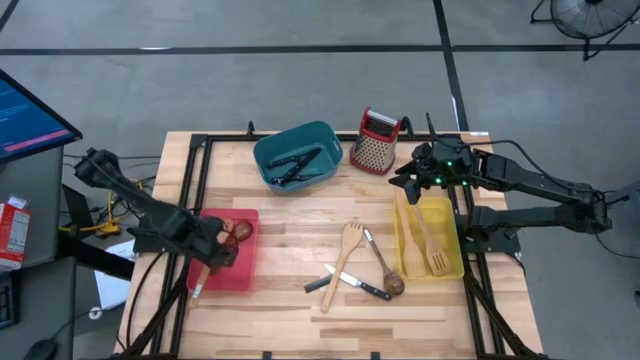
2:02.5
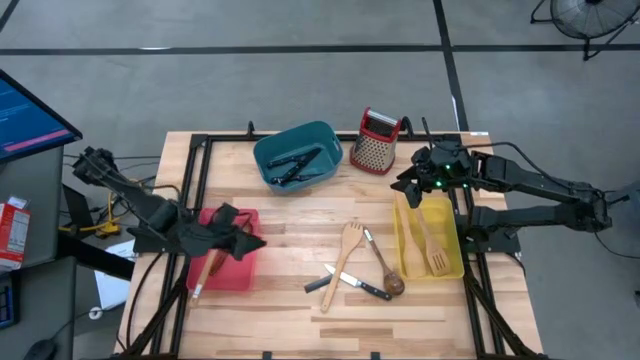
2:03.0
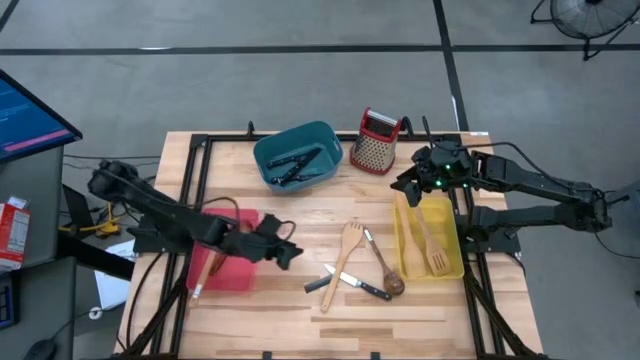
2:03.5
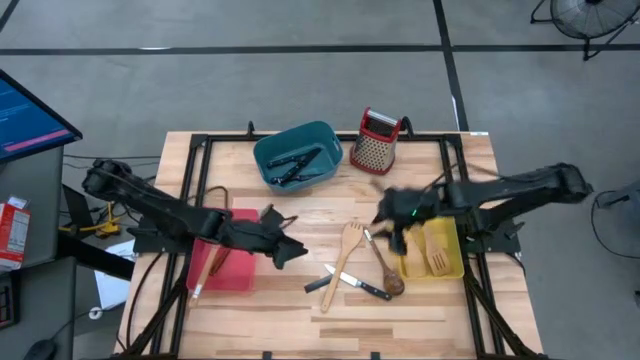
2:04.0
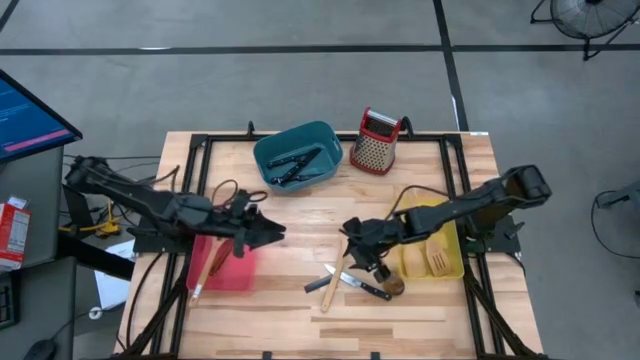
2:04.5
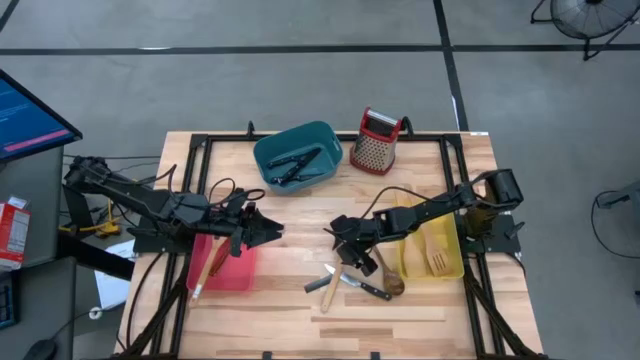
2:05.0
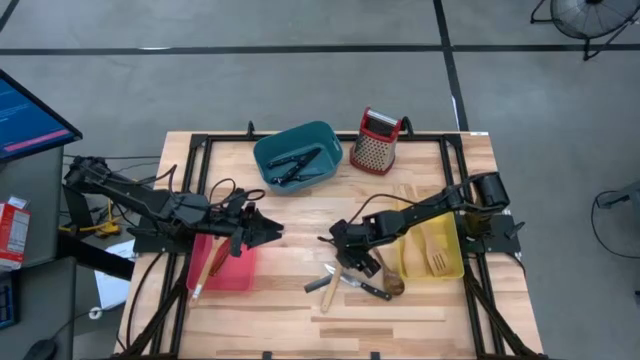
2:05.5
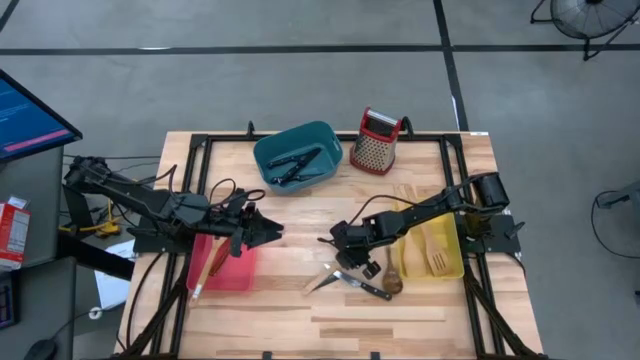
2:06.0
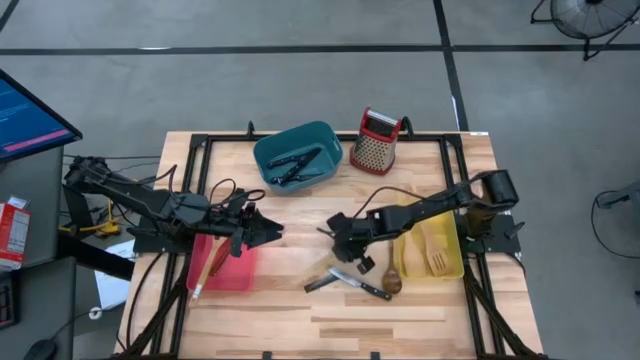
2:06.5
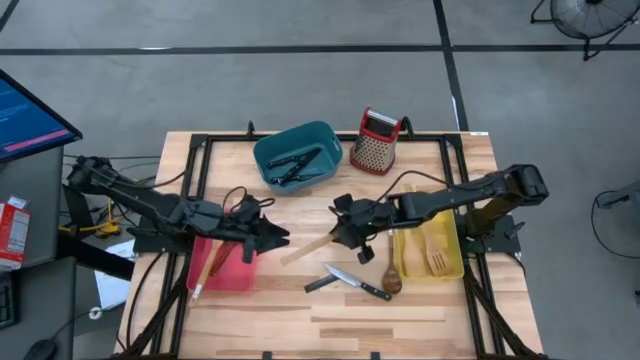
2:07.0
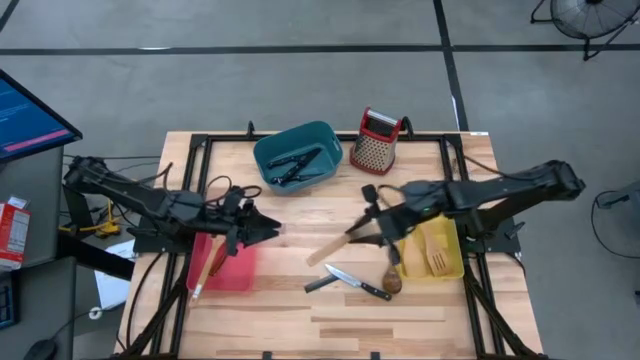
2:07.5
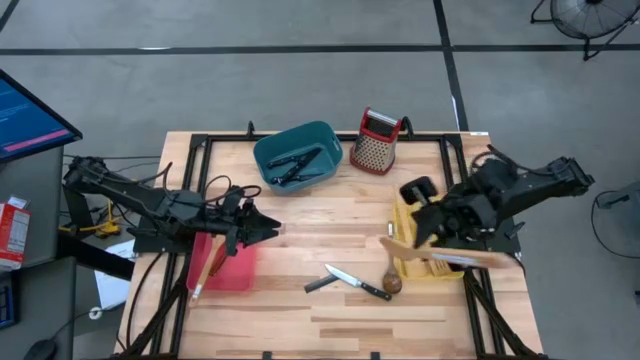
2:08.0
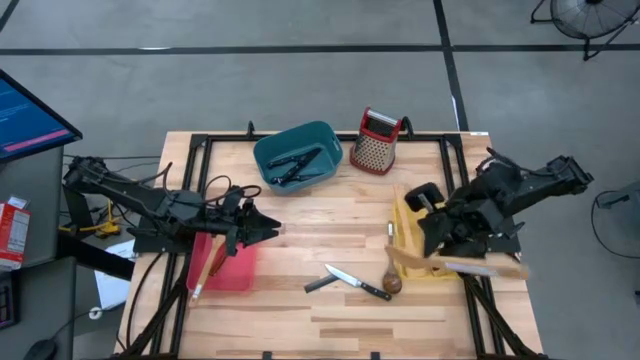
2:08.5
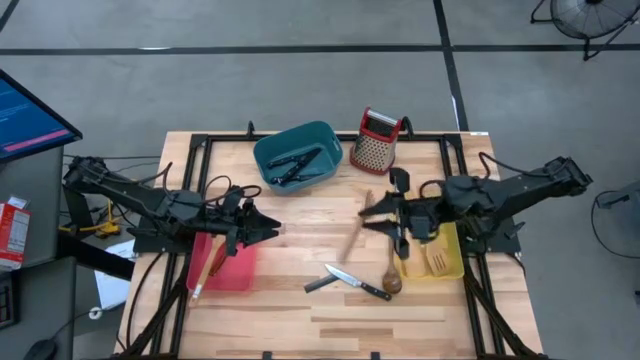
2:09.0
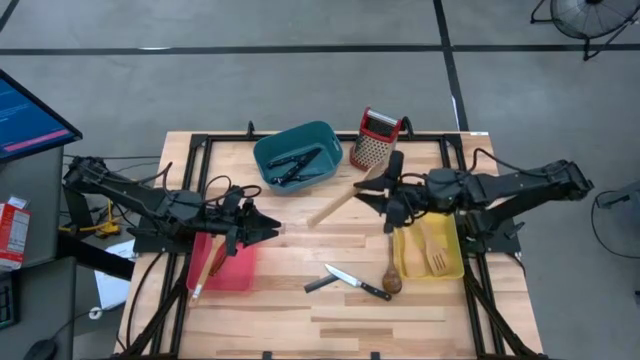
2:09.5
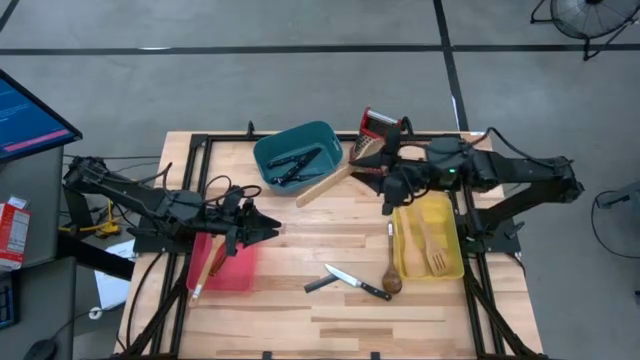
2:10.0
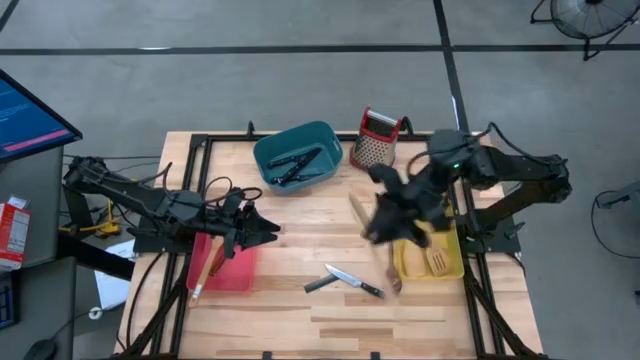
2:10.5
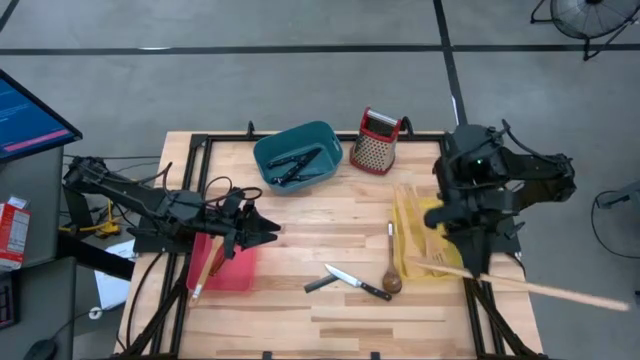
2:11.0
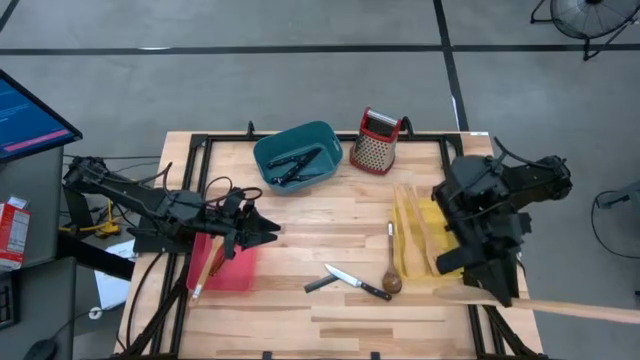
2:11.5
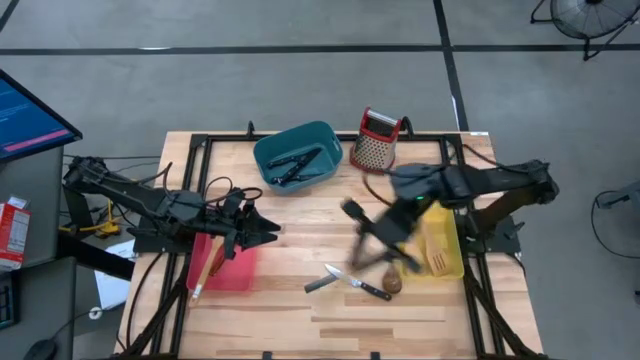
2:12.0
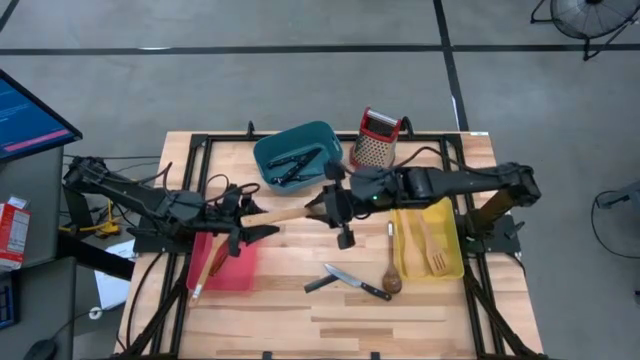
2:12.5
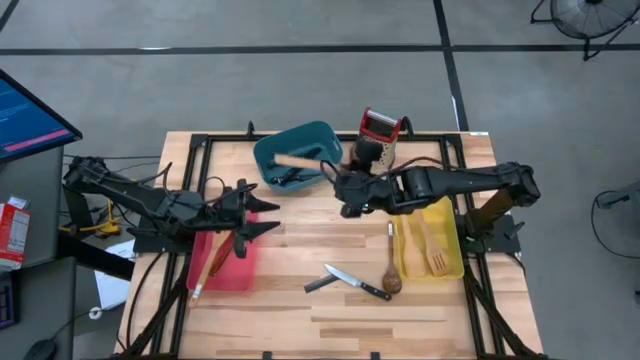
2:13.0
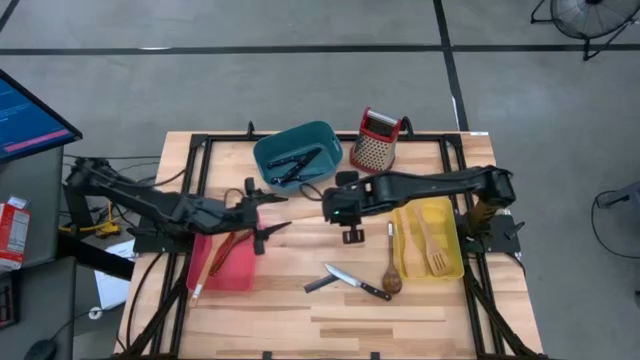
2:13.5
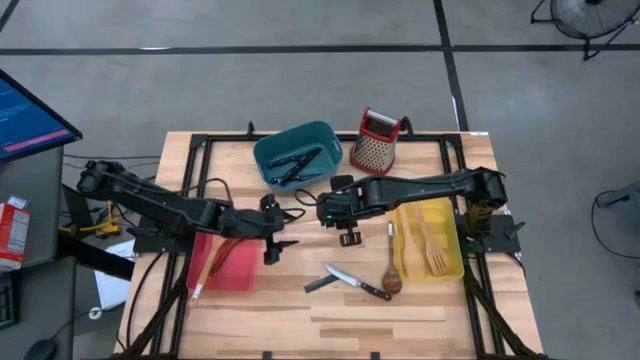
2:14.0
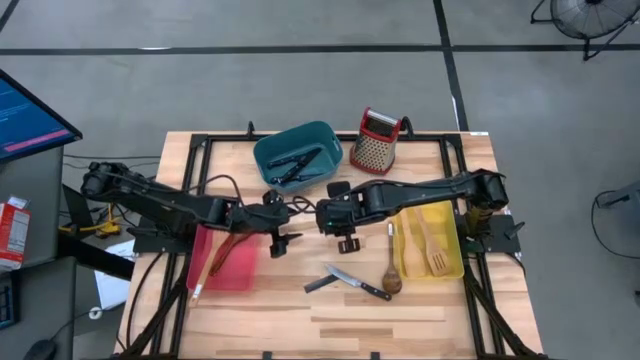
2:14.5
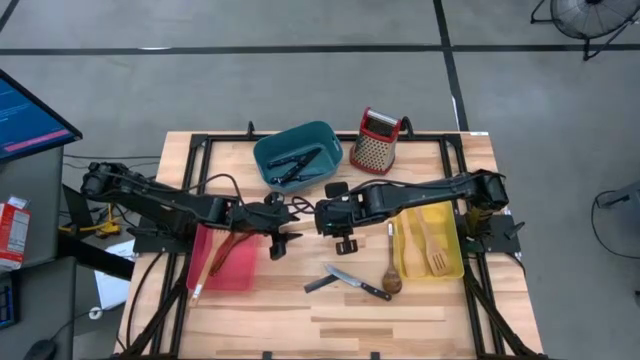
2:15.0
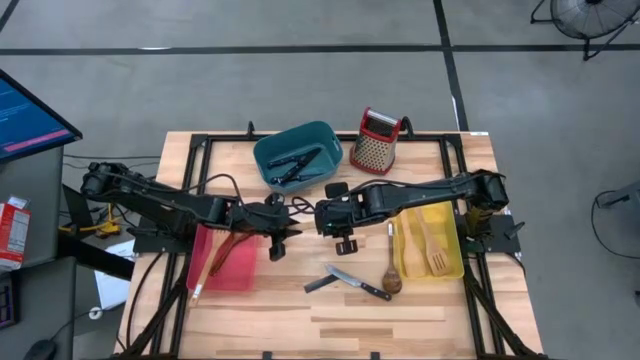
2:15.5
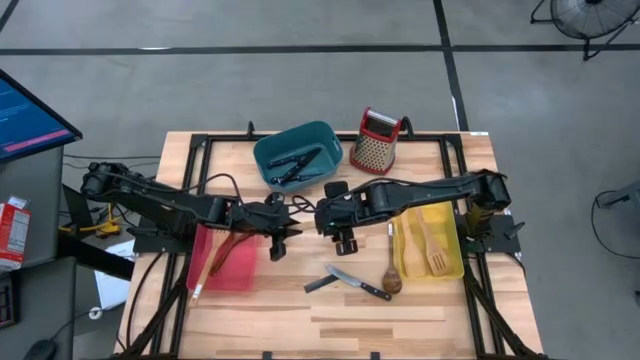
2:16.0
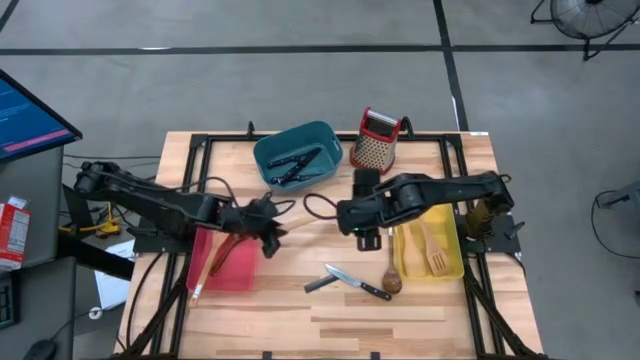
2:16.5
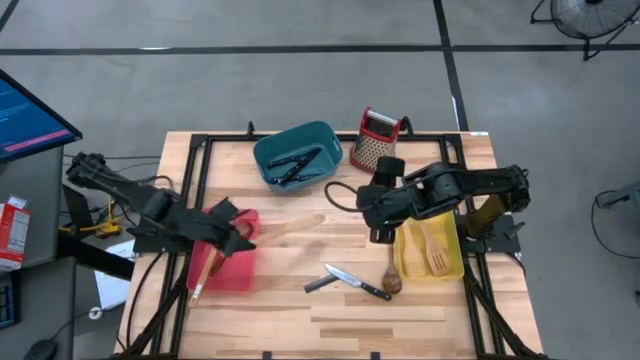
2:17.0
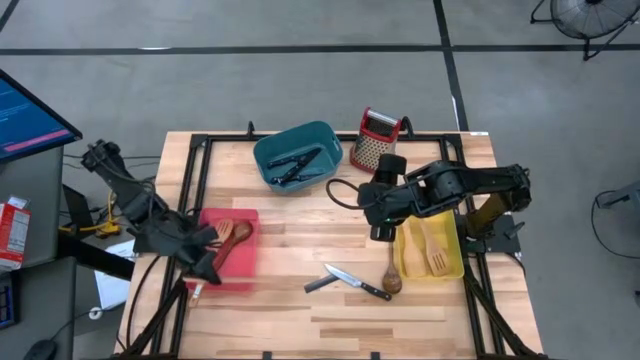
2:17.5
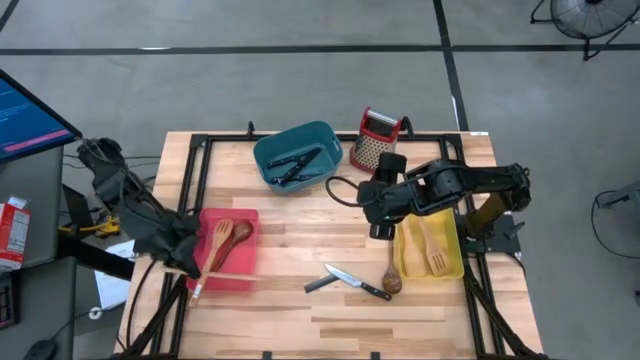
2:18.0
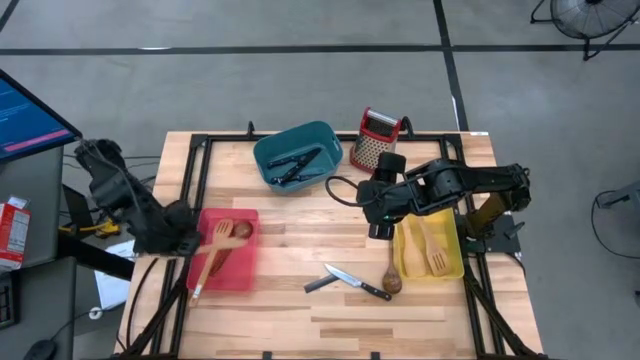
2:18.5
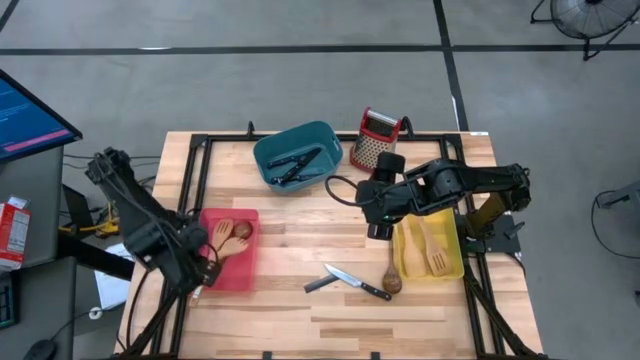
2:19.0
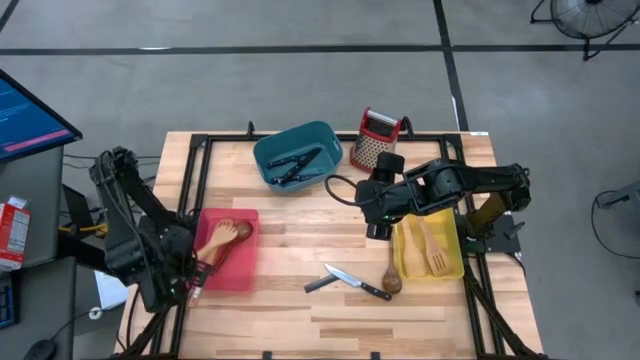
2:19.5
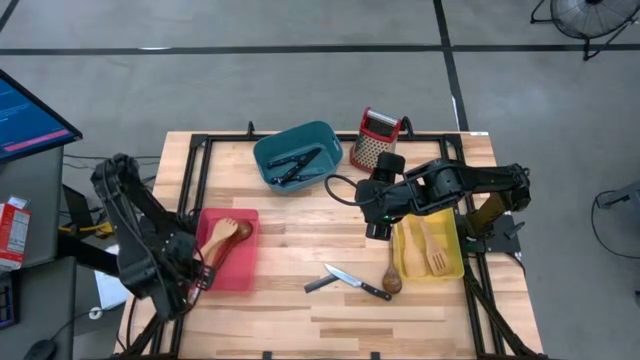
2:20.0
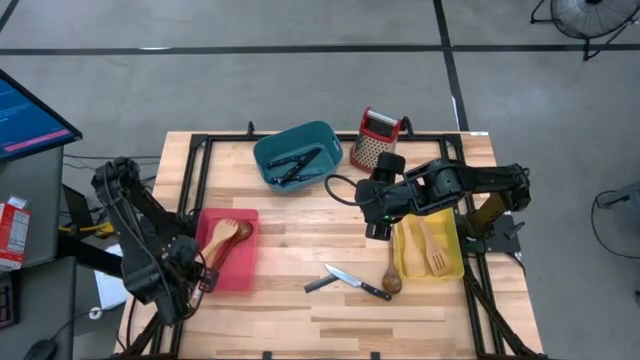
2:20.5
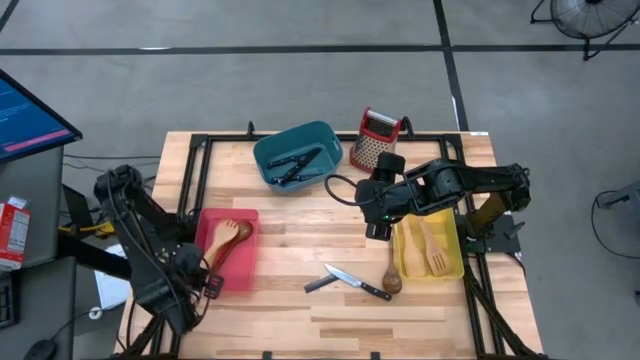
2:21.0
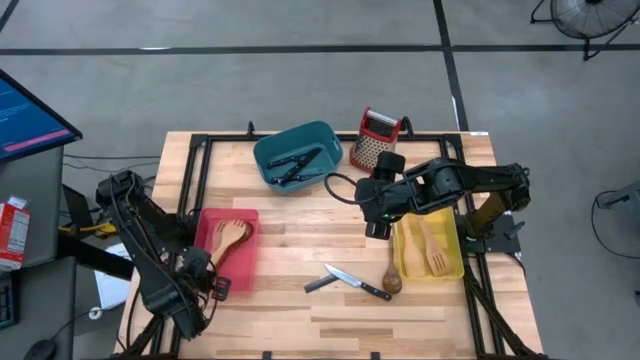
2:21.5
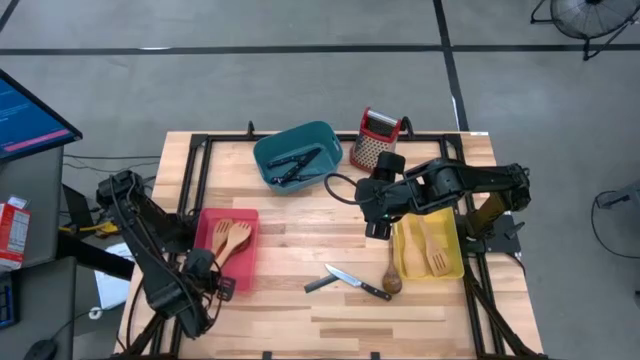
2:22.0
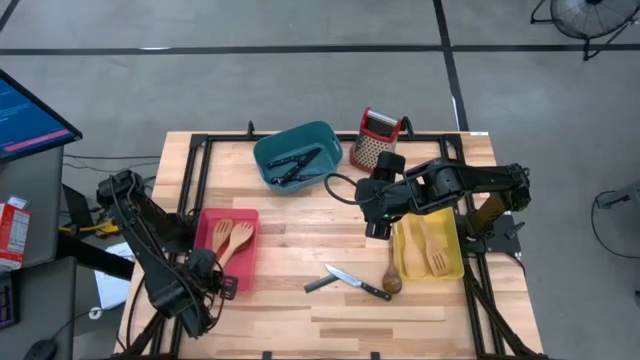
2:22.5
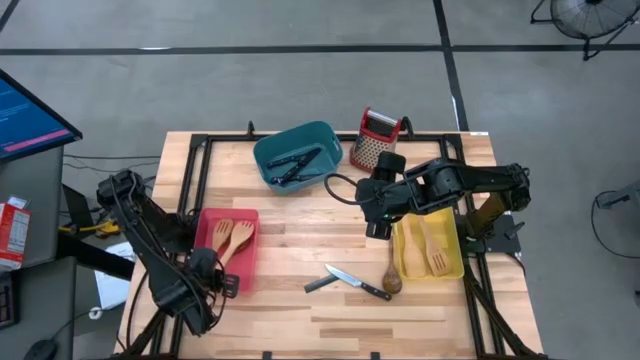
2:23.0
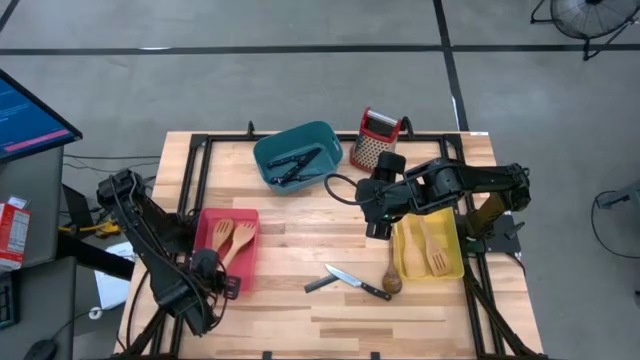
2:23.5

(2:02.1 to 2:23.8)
Task: Pick & Place Kitchen Items
Put the brown serving fork into the pink bin
